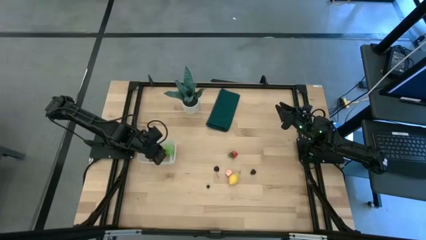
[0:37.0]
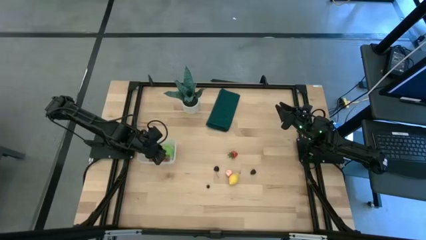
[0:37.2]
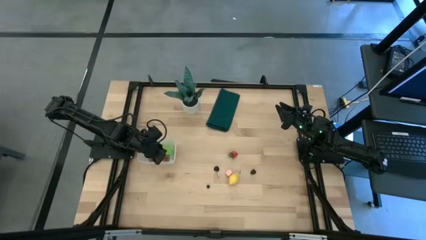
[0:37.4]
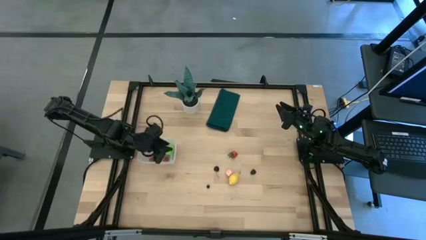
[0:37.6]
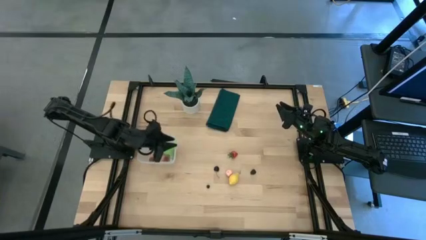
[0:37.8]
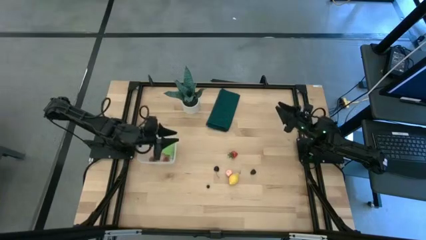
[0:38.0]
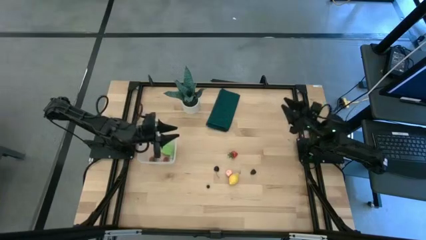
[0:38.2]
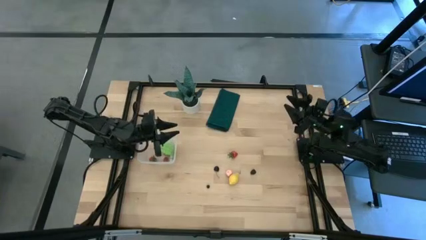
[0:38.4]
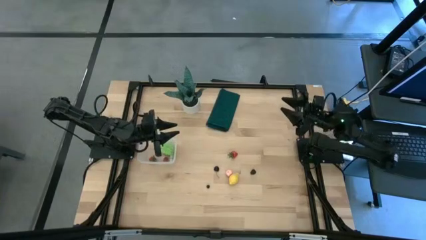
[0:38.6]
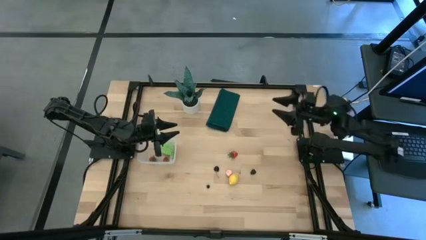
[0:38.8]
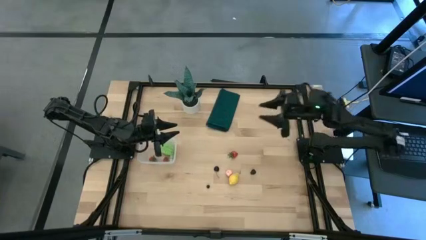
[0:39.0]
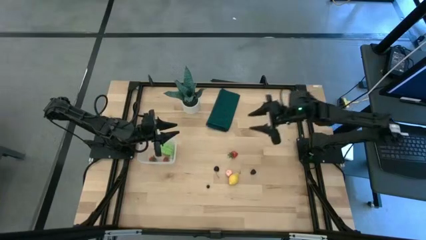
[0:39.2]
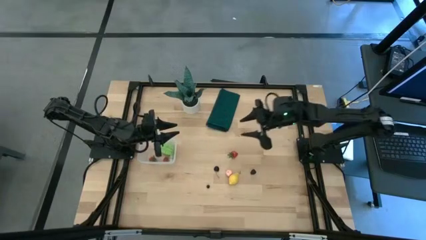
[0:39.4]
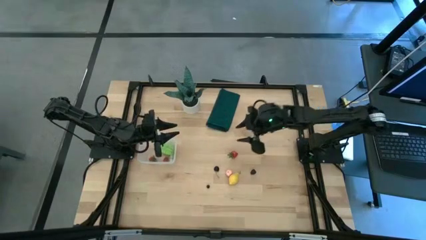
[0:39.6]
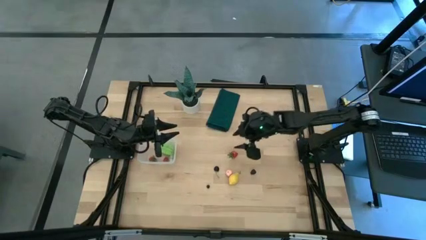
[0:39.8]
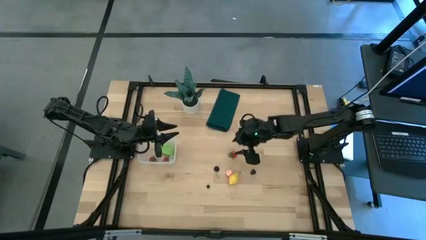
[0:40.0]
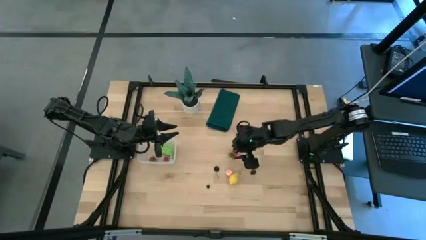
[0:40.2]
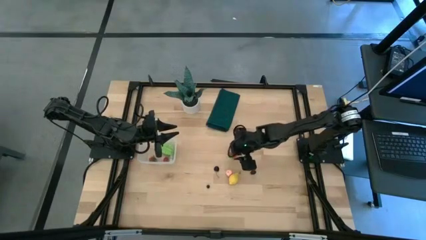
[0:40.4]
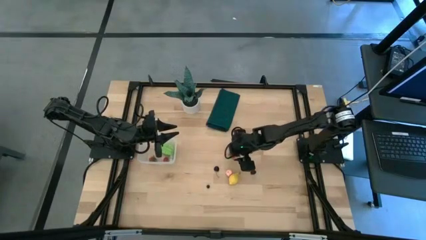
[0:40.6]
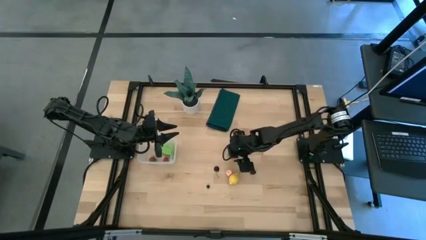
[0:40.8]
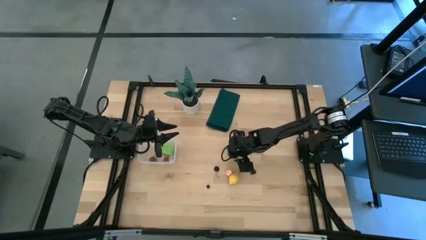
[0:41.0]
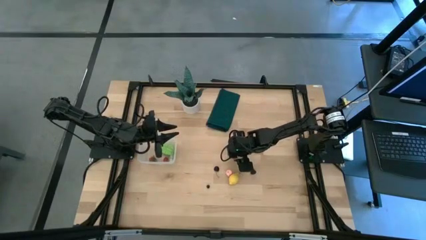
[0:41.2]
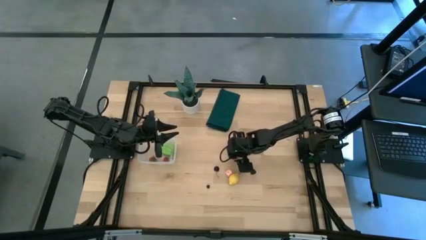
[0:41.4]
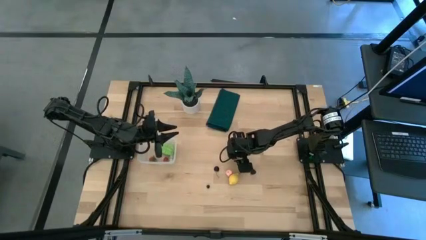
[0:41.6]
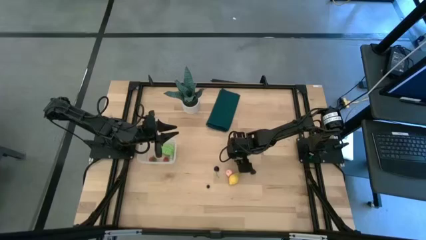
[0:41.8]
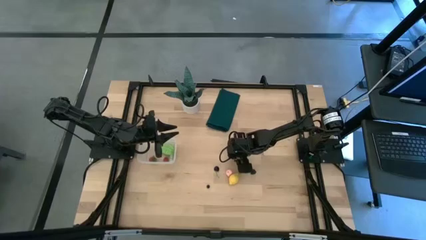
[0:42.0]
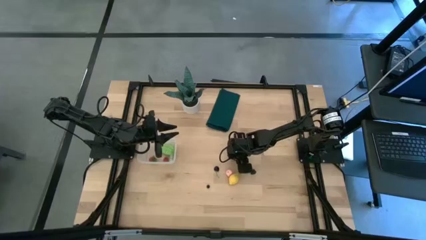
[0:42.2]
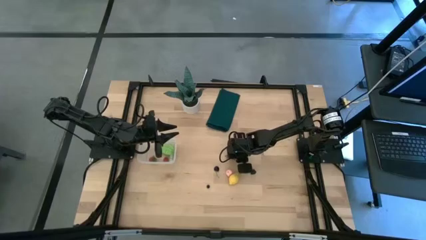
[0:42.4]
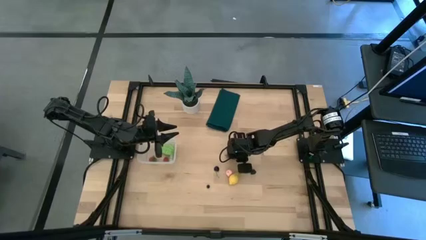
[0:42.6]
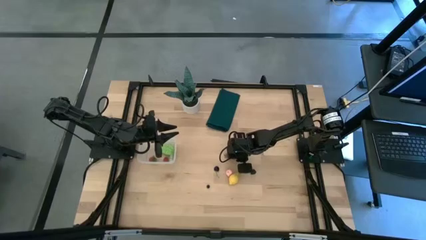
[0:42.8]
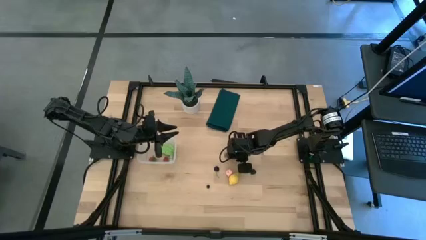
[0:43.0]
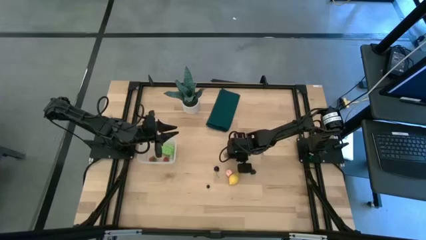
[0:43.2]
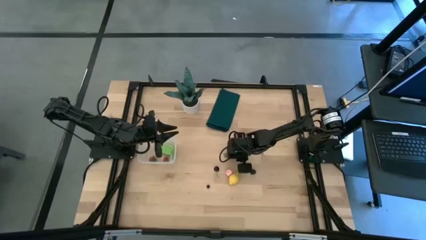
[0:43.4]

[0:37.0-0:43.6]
Task: Pick and placing Produce into tupperware
Put the strawberry into the transparent bin

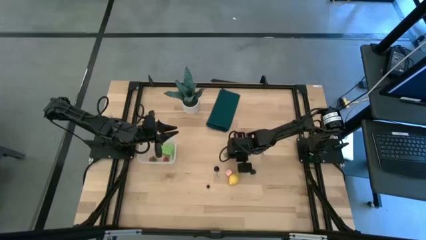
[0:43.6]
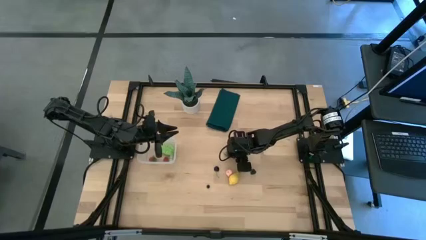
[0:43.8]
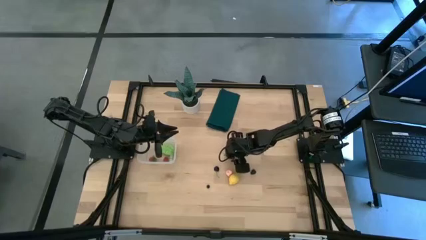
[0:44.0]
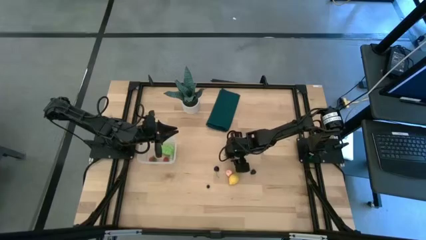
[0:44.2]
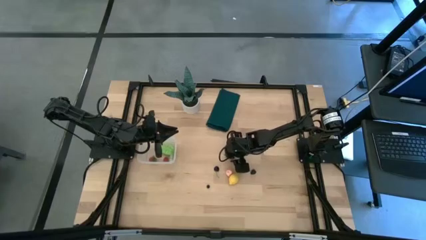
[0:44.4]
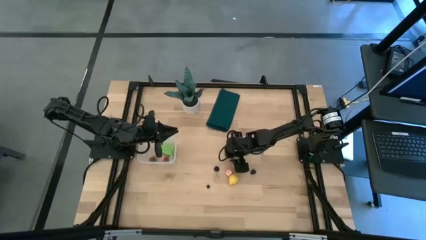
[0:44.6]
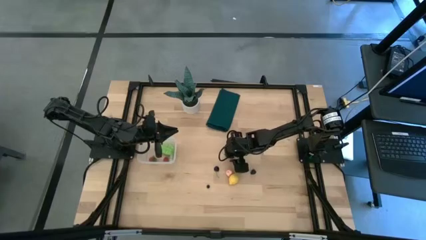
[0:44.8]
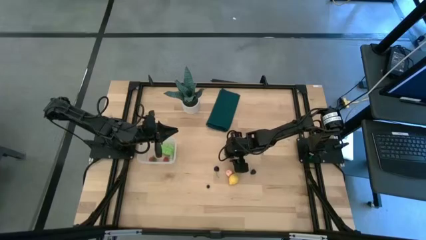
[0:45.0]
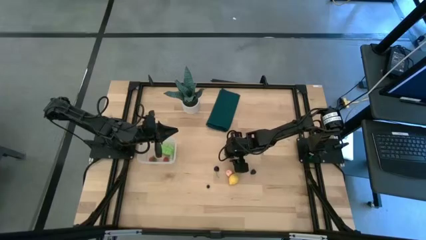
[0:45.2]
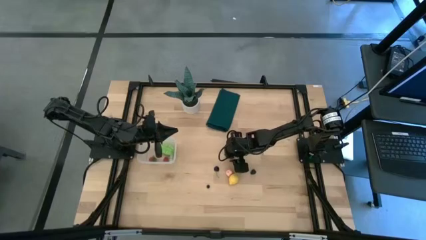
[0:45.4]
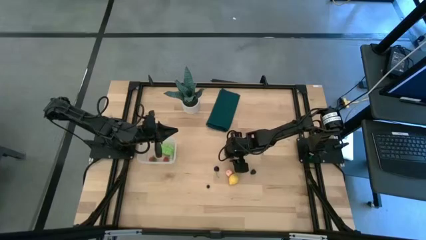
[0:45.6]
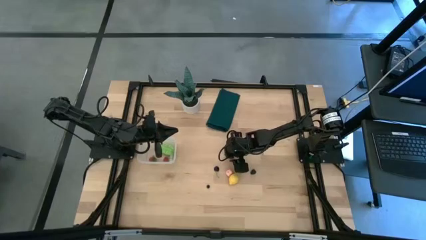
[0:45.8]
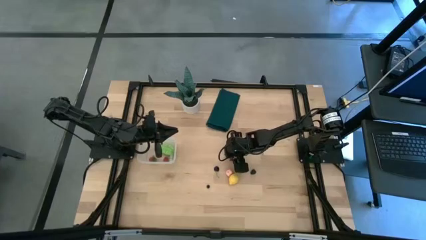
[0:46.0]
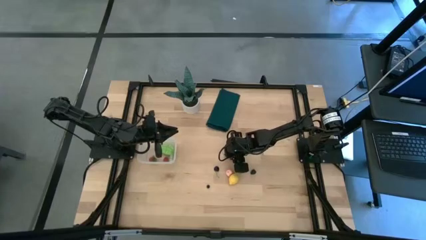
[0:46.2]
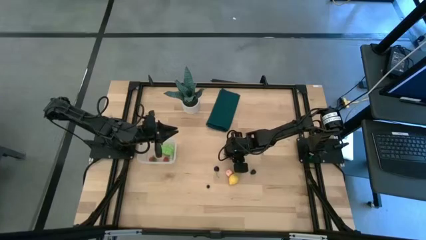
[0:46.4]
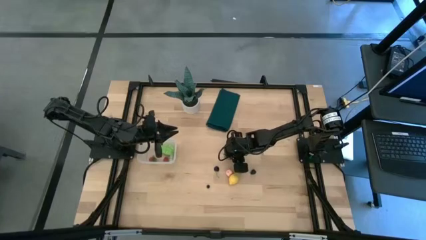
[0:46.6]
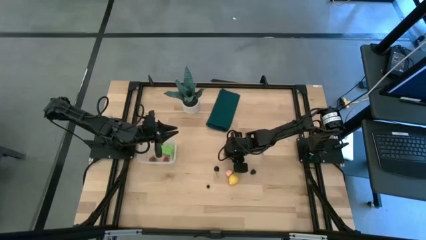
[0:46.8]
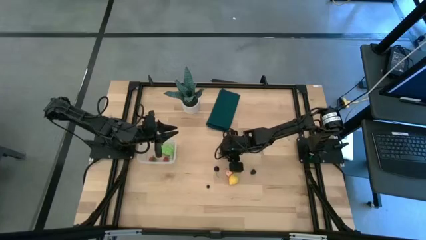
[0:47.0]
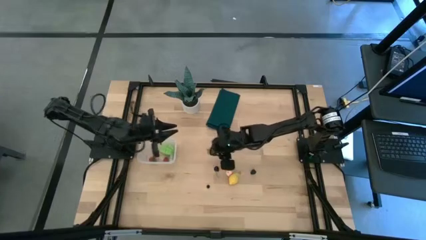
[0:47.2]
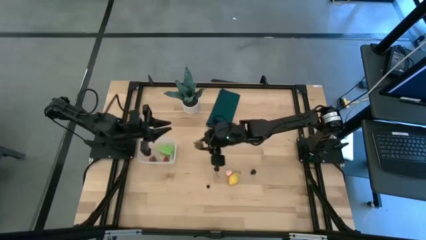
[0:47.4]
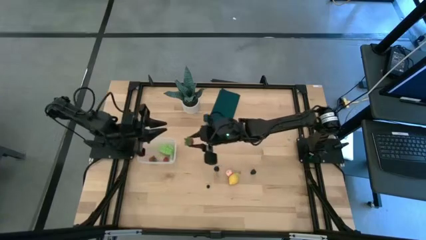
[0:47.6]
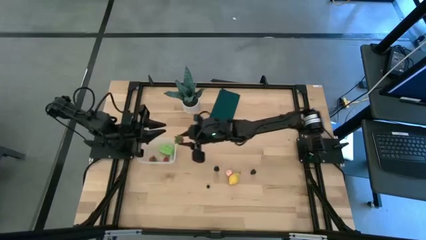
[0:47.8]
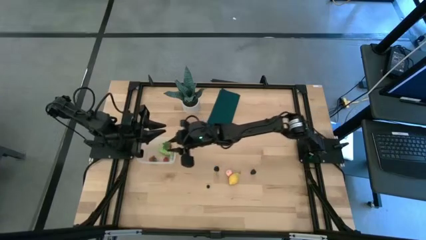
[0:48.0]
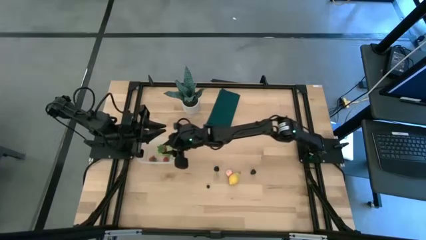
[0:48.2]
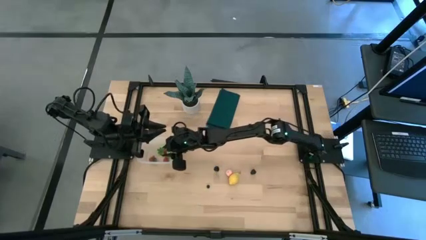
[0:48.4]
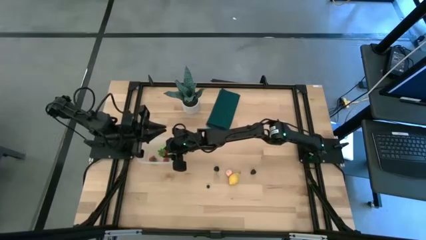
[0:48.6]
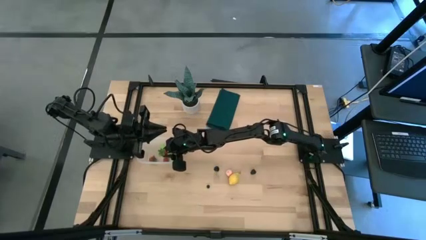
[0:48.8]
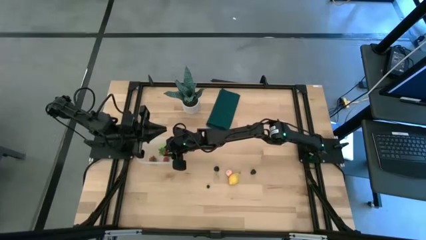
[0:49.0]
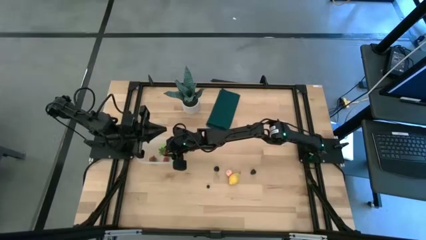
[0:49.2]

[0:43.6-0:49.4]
Put the strawberry into the transparent bin

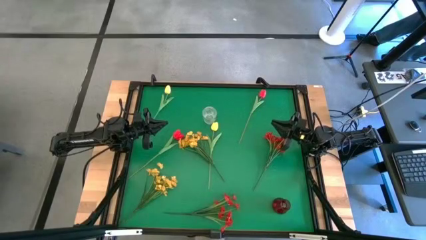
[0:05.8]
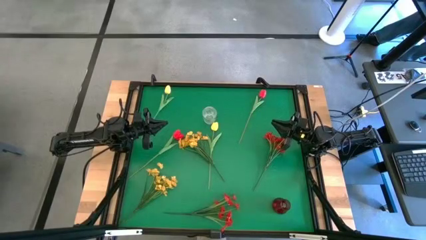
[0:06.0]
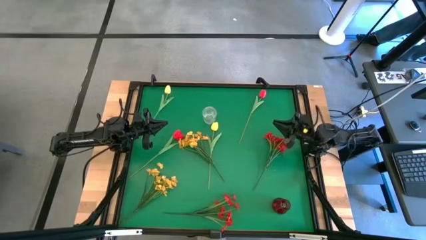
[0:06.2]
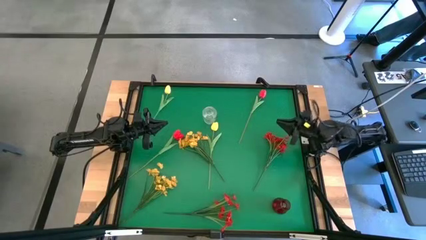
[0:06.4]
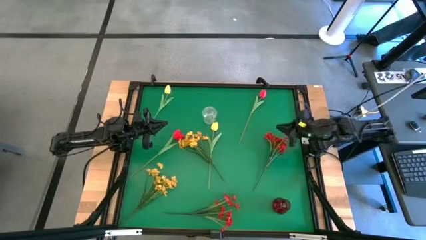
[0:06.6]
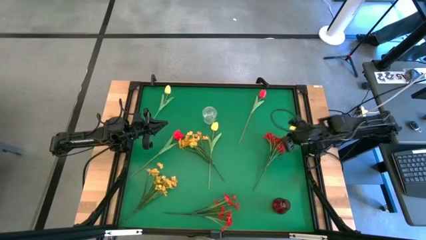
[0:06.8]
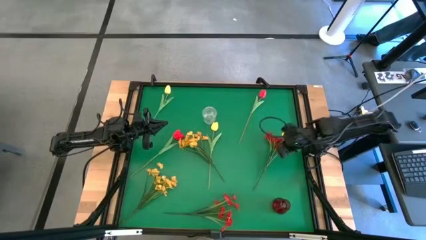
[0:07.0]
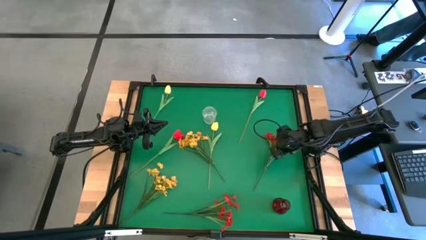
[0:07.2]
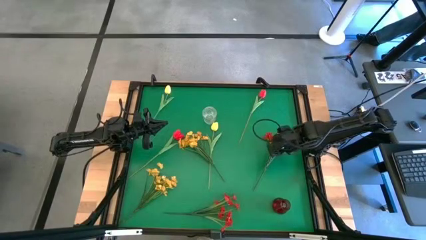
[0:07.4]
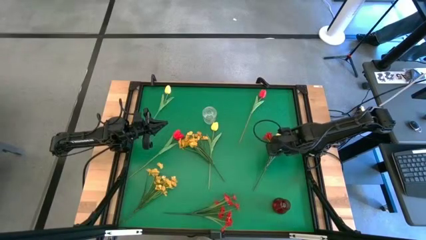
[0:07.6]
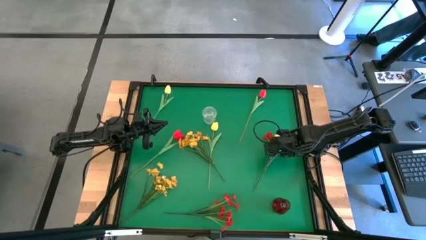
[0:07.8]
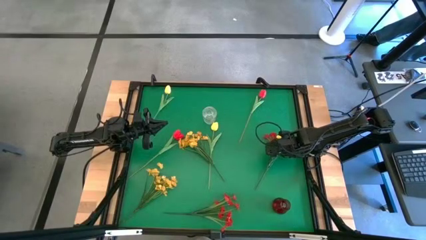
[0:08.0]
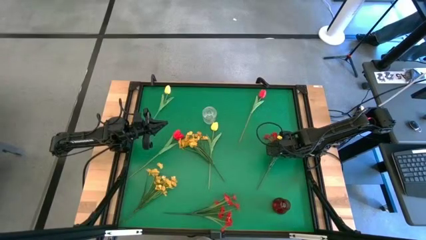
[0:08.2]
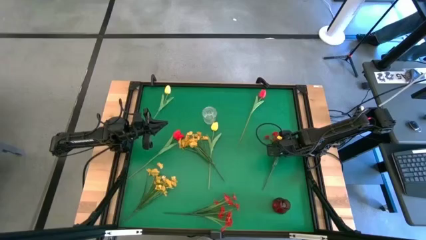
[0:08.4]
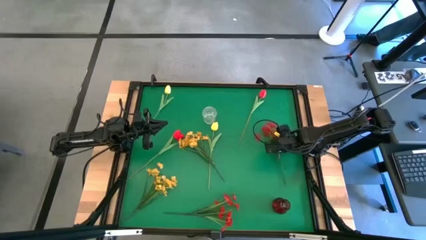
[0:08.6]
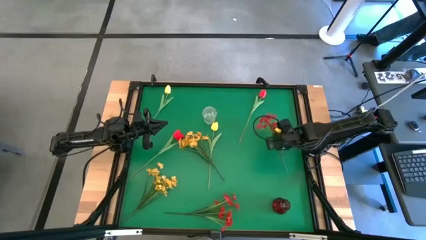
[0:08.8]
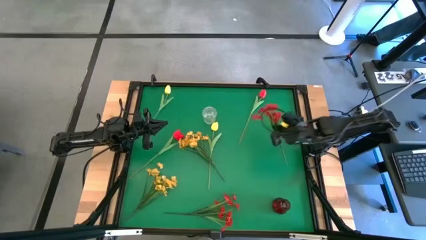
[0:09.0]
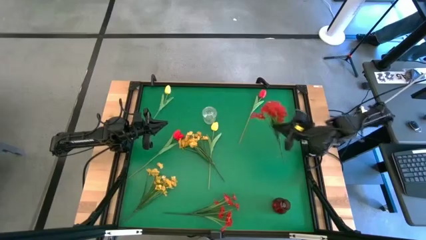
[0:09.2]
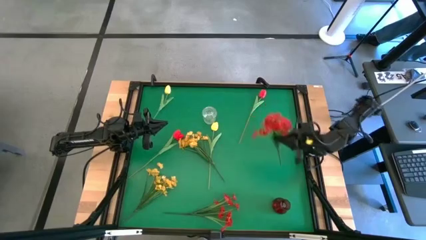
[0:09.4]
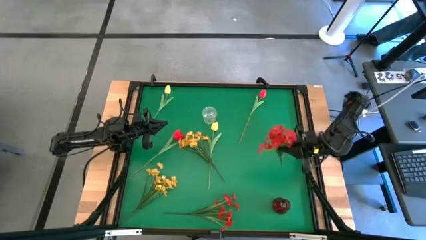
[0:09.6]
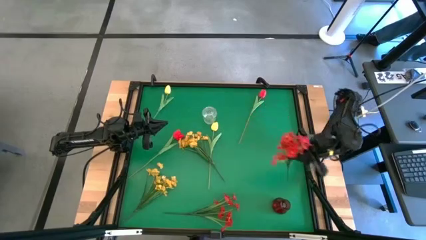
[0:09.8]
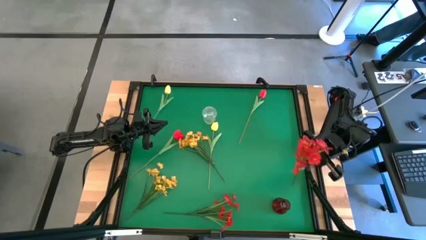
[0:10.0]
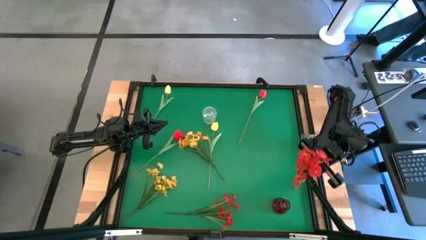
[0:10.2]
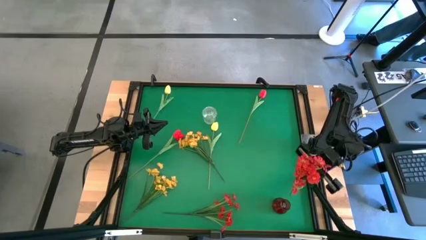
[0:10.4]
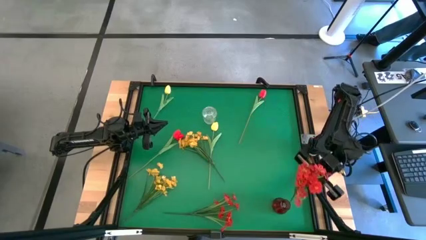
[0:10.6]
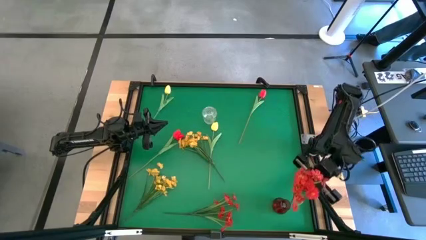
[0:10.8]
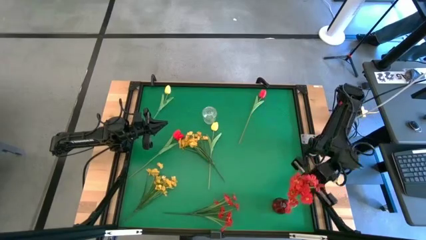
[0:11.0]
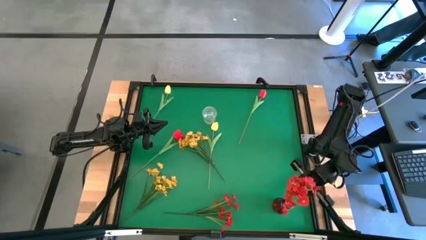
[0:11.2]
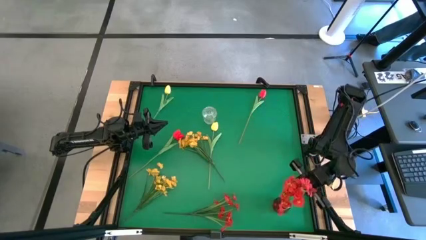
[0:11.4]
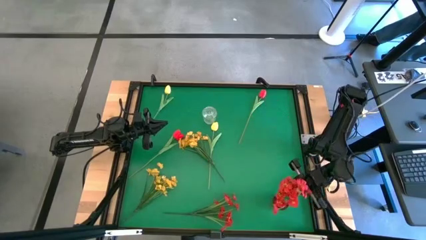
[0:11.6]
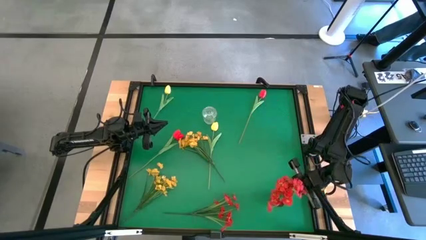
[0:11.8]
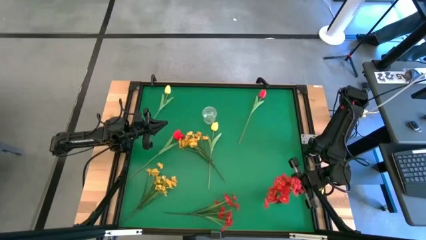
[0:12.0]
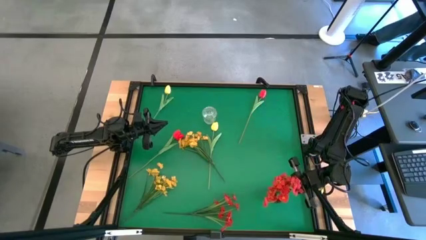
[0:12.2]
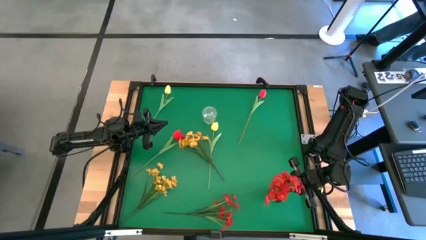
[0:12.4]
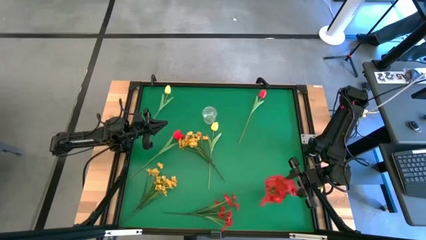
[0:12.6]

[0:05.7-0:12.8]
Task: Sort flowers into vase by color
Put the middle right red flower into the red vase
